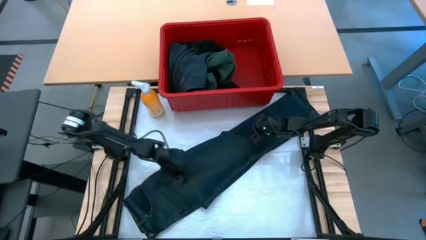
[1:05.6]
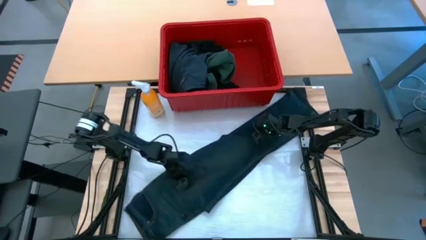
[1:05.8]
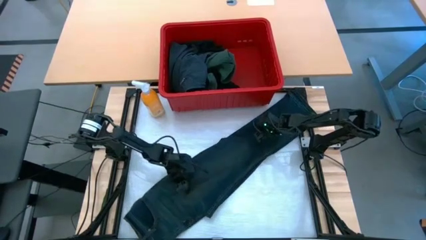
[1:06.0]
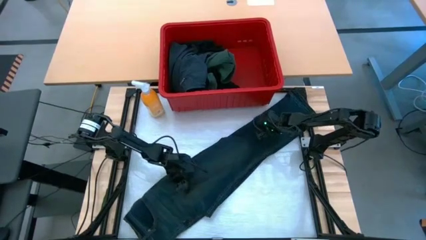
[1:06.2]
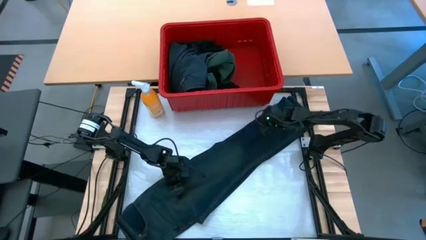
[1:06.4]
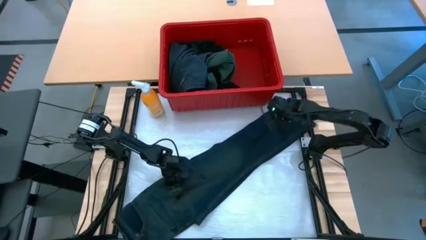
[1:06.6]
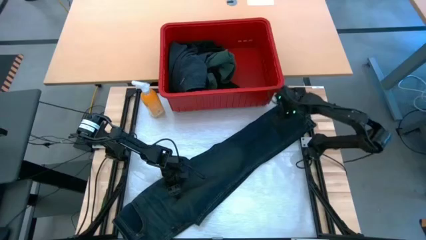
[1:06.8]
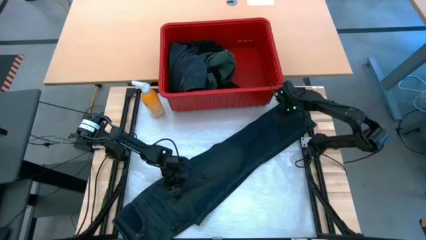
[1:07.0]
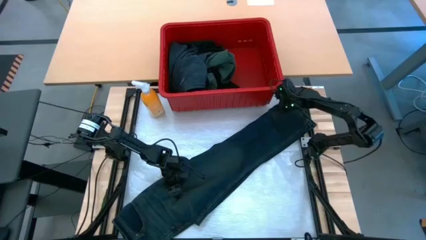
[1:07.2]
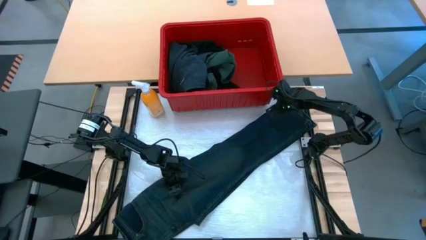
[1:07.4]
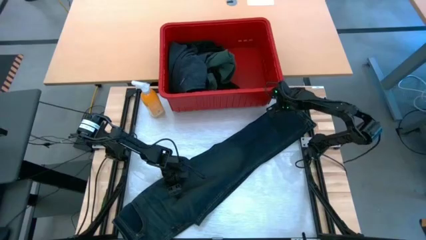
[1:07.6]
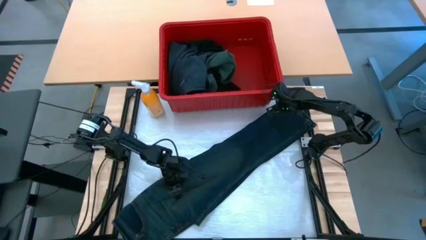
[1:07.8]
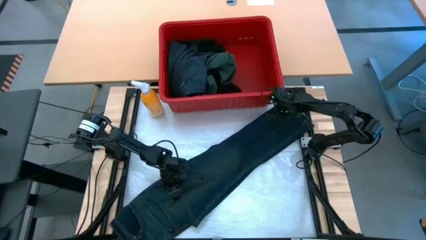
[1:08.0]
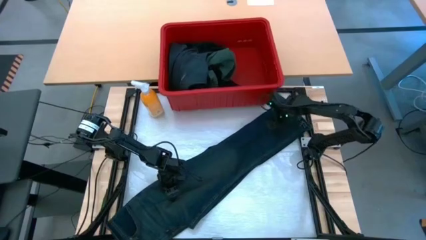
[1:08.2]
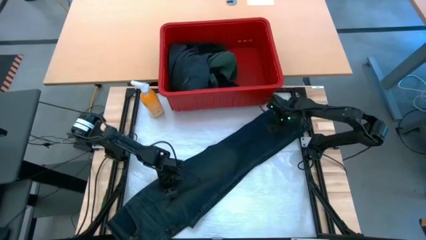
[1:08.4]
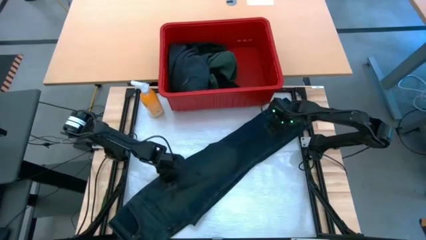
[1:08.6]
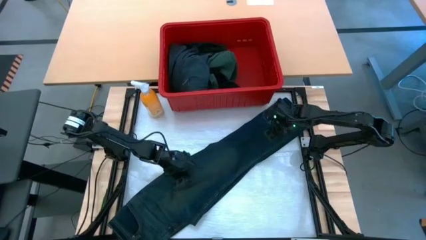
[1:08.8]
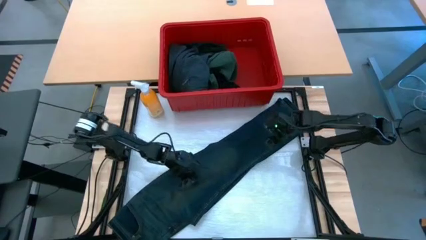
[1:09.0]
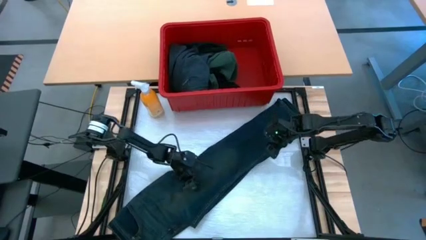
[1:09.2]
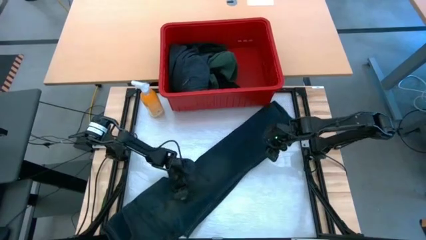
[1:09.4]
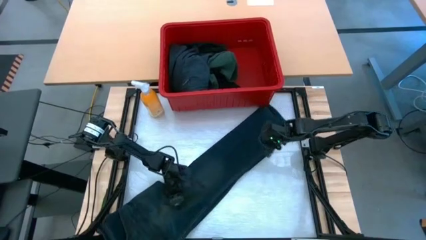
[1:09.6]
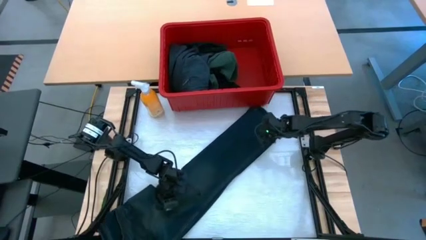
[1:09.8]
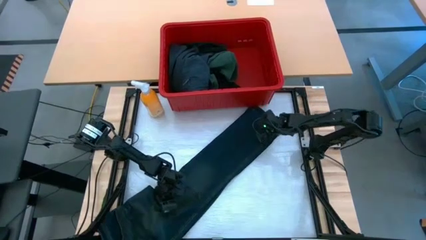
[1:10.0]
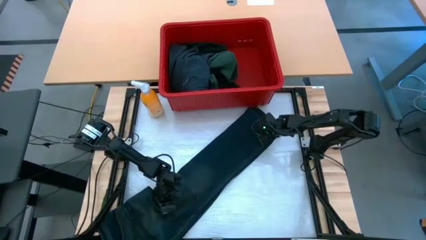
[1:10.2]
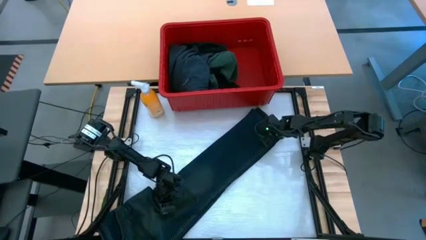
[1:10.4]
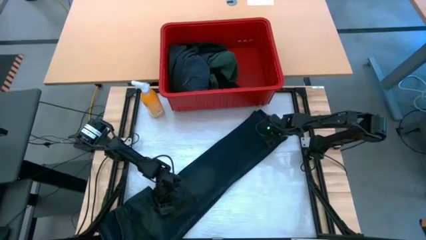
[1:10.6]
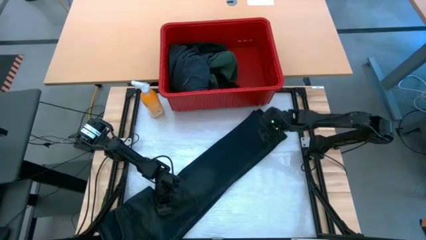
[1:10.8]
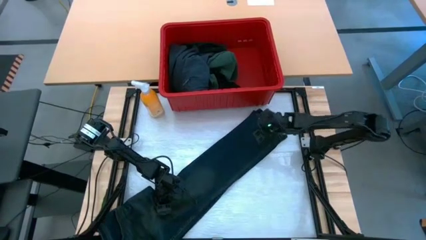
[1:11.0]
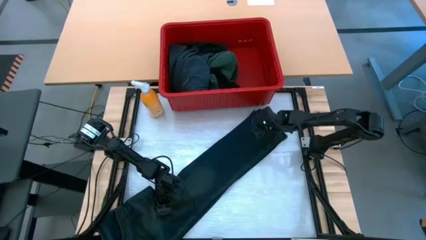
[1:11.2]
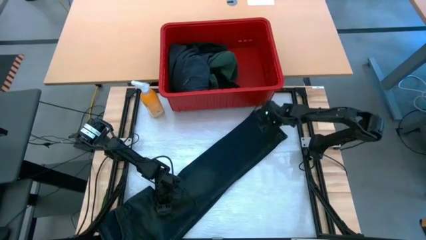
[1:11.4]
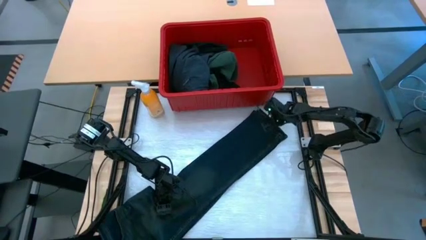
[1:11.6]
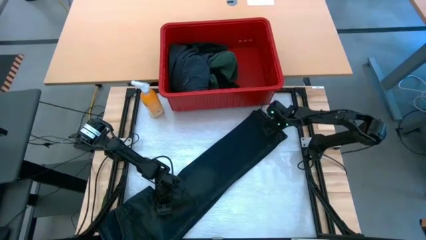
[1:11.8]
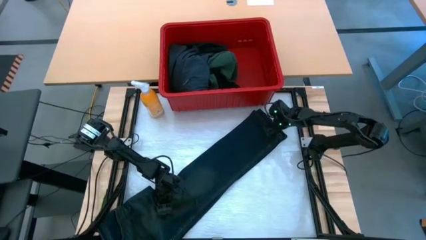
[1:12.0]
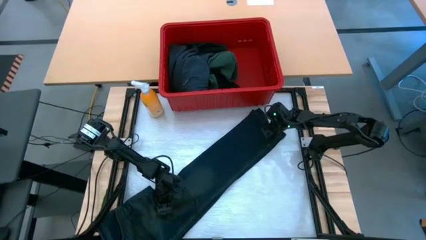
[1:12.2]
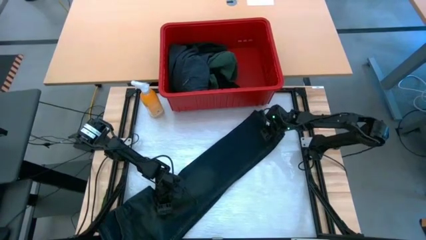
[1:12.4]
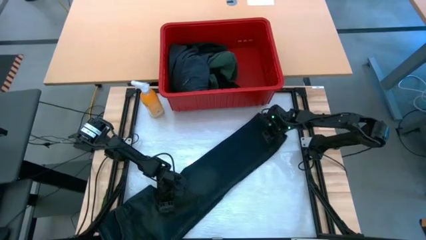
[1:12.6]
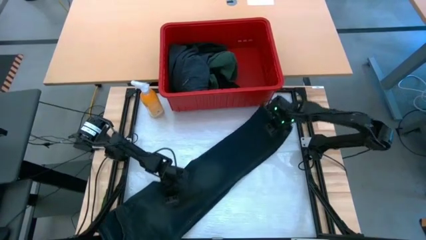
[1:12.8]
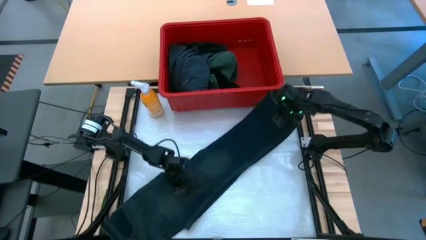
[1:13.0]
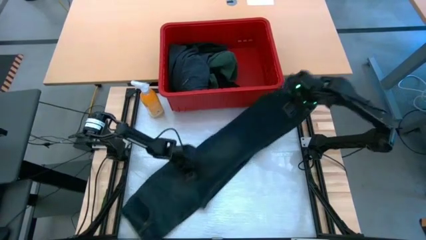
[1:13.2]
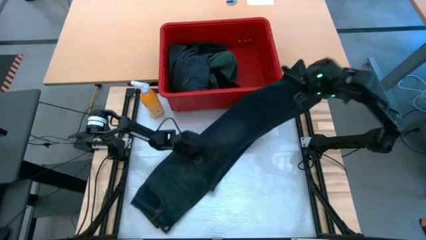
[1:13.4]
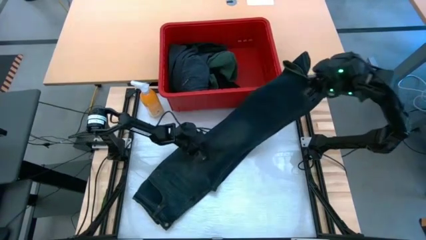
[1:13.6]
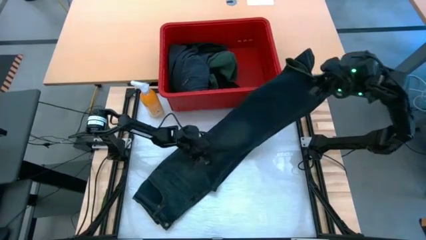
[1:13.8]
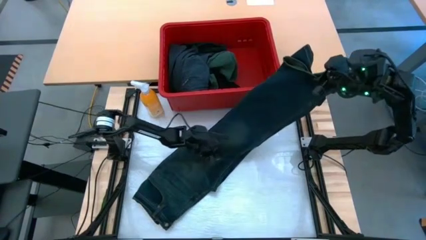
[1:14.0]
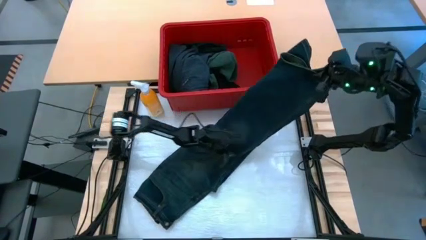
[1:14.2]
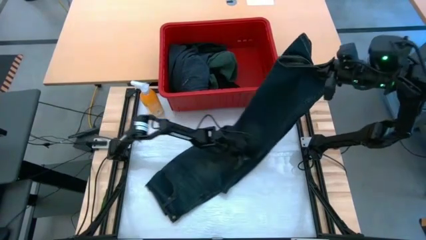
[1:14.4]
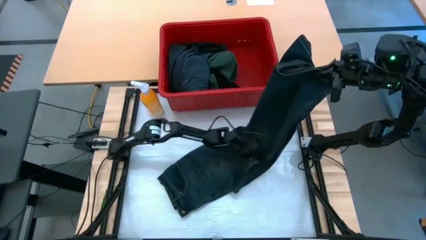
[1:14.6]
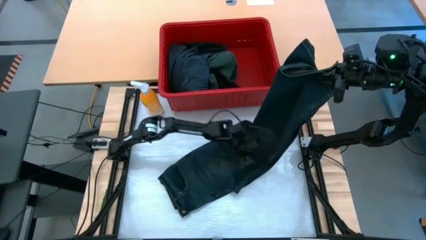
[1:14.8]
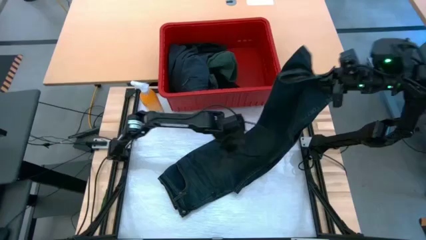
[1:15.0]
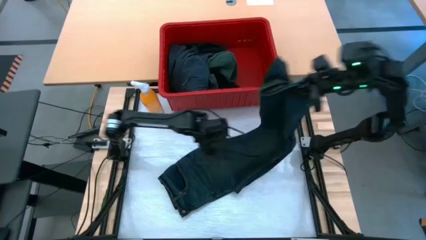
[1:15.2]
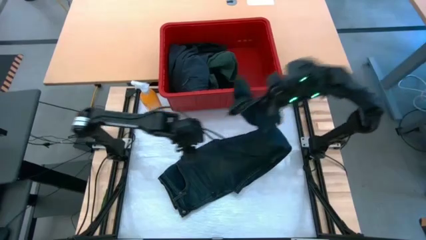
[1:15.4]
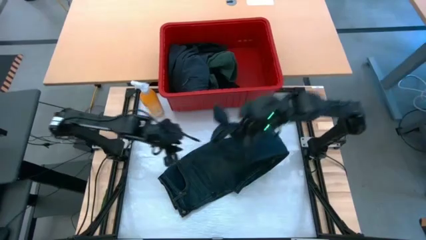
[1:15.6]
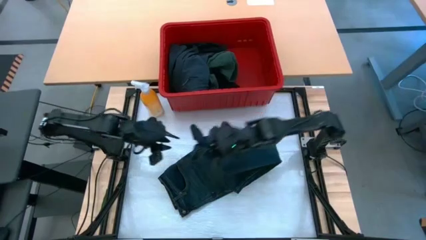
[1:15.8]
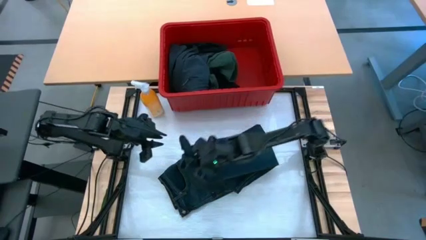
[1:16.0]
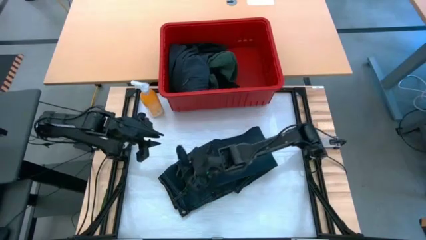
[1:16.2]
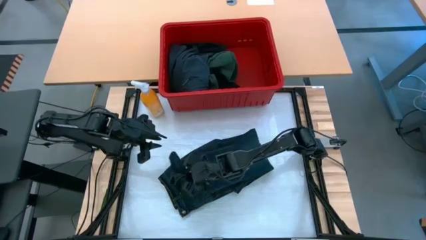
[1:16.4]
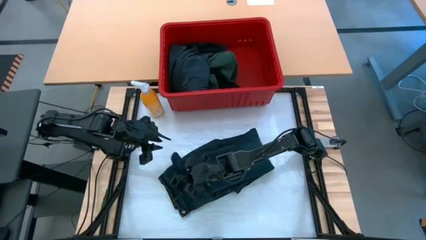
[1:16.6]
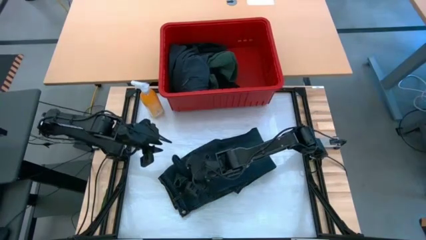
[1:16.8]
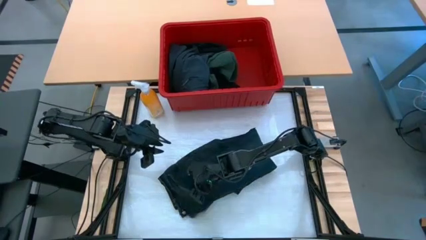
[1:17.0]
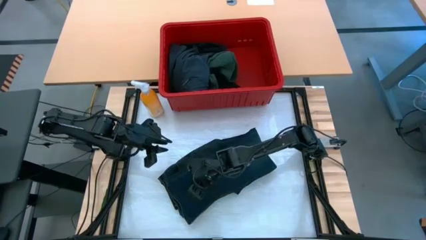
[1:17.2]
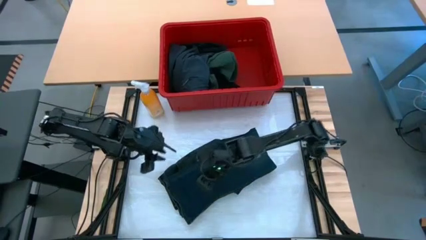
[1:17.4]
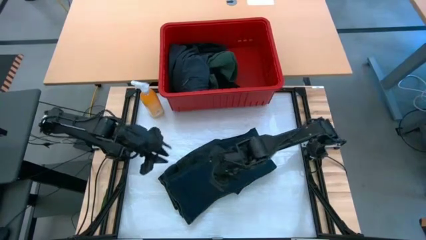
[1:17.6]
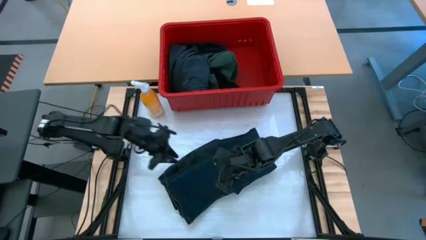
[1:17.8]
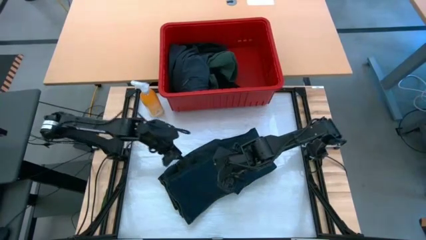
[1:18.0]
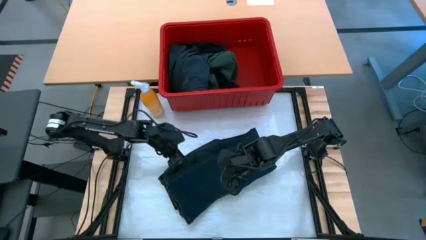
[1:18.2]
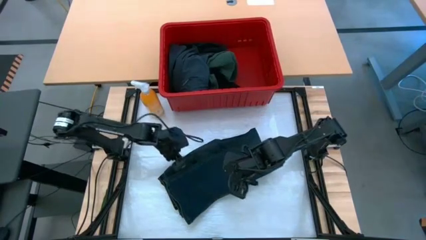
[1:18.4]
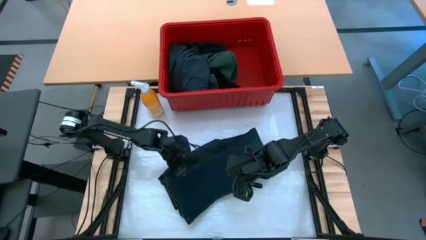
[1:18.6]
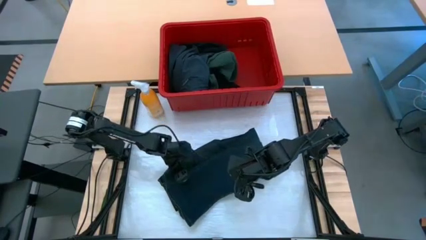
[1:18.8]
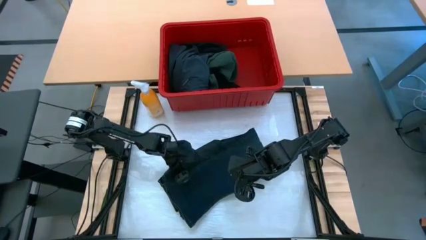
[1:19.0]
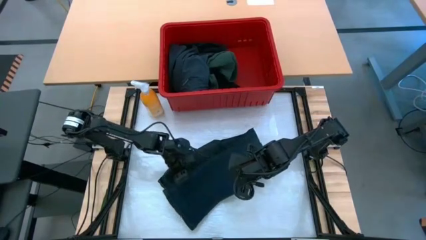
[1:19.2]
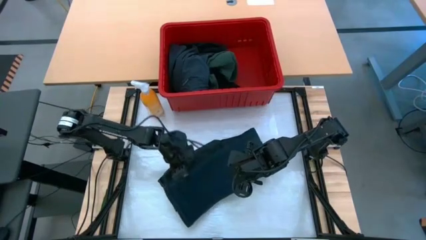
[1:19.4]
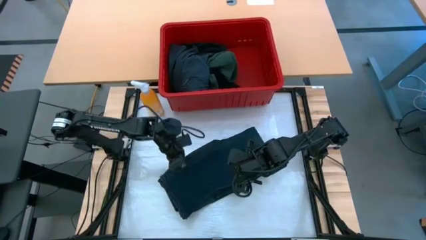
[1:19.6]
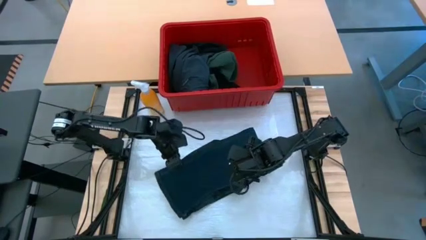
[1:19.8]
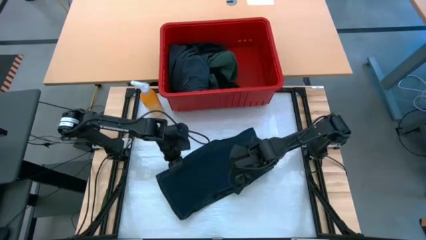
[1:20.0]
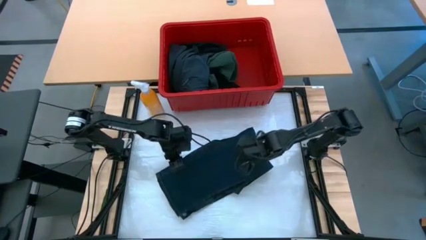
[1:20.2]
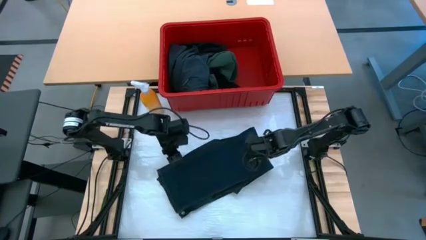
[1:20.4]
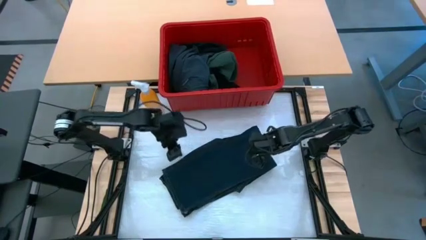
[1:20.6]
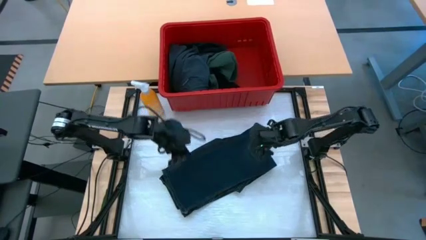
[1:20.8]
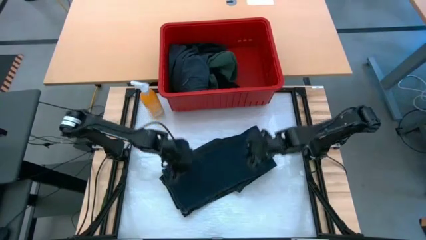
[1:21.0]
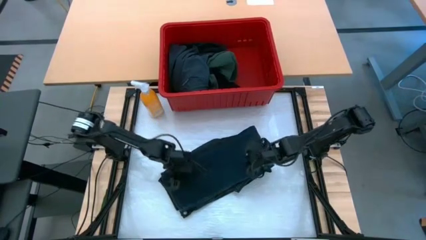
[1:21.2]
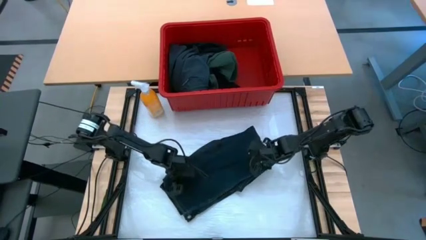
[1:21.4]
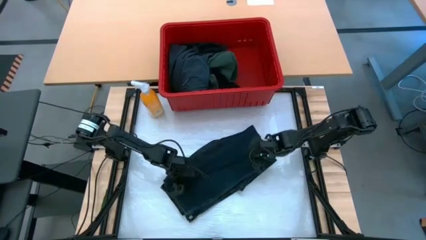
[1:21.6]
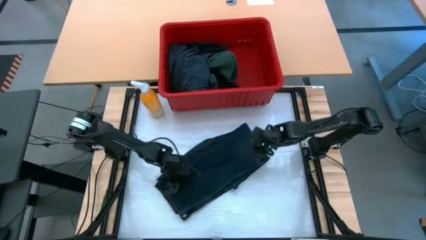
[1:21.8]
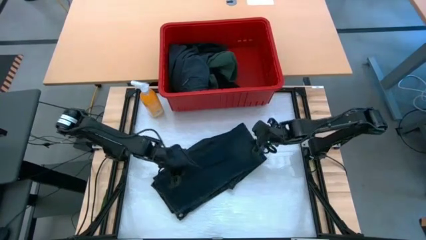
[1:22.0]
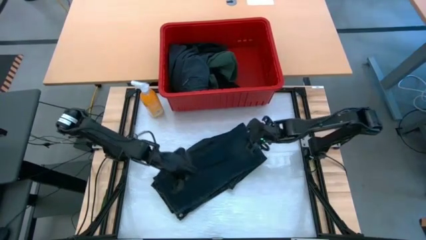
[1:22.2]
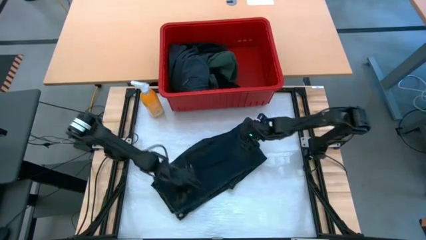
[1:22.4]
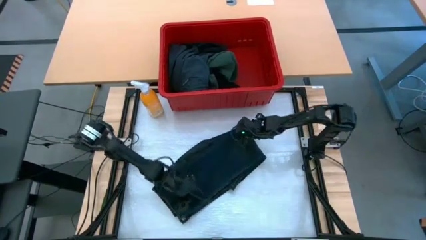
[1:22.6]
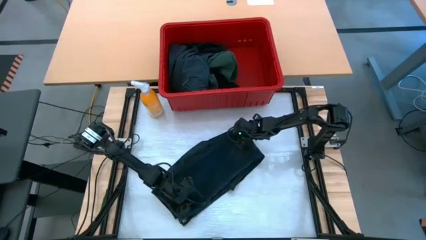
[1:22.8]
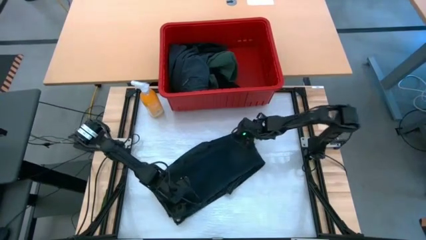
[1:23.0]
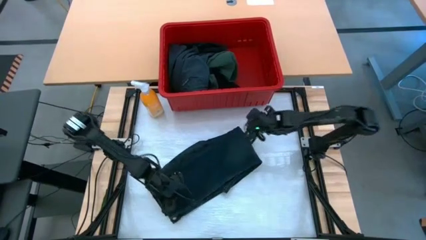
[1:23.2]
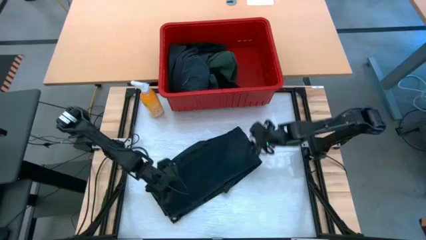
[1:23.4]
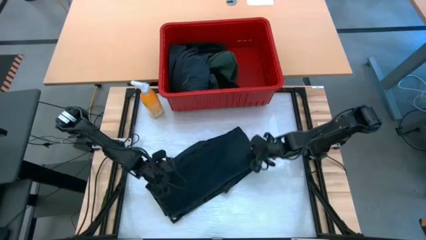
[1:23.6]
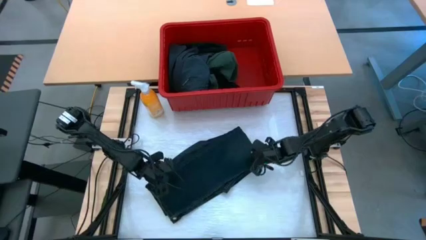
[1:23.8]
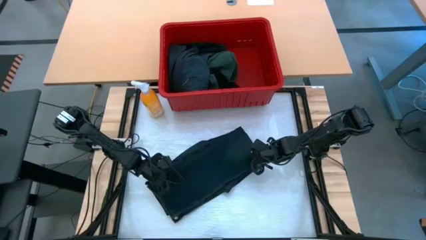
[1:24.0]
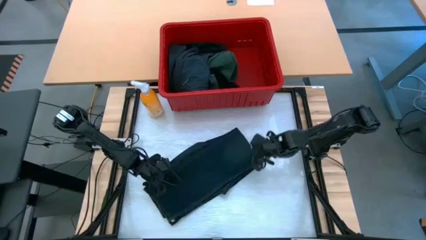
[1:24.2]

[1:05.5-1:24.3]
Task: Fold Laundry from Bin
Fold the blue pants
